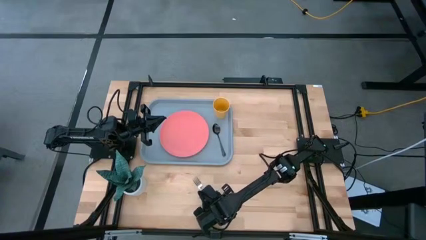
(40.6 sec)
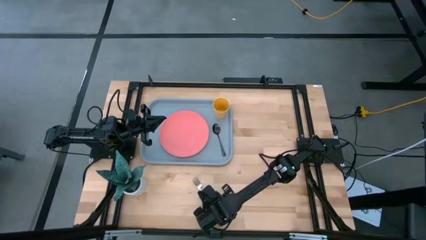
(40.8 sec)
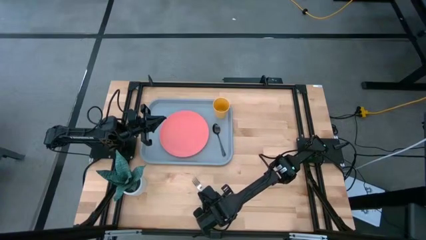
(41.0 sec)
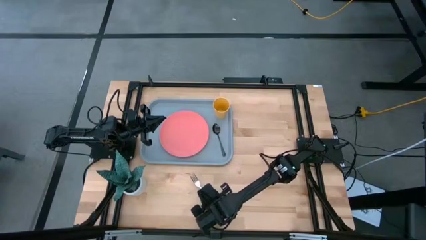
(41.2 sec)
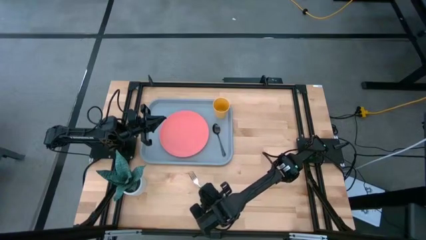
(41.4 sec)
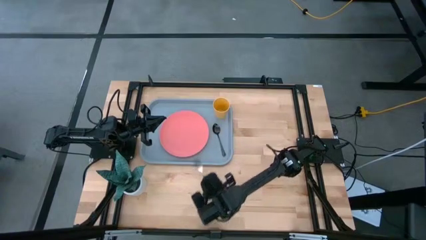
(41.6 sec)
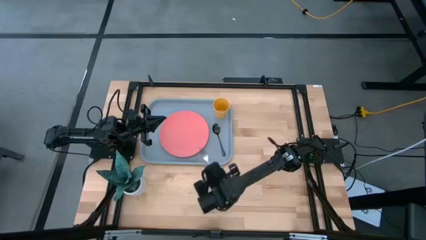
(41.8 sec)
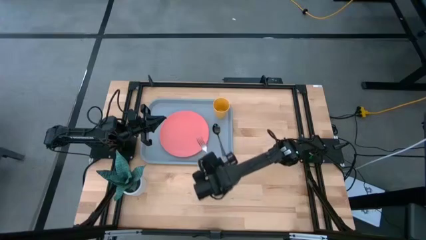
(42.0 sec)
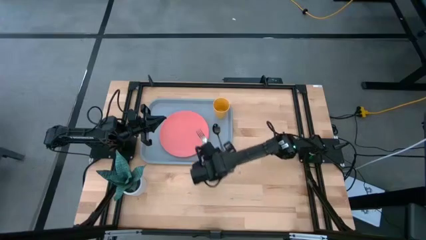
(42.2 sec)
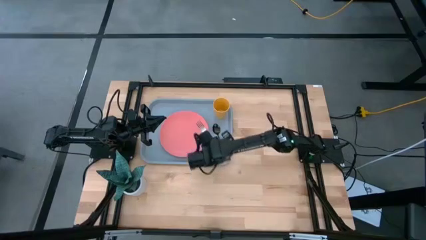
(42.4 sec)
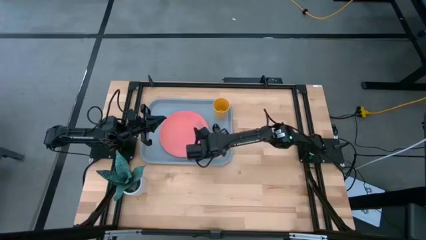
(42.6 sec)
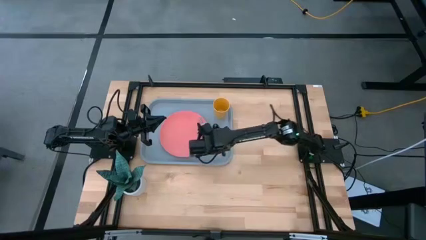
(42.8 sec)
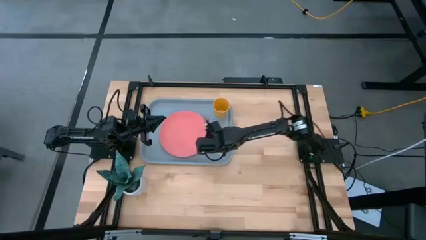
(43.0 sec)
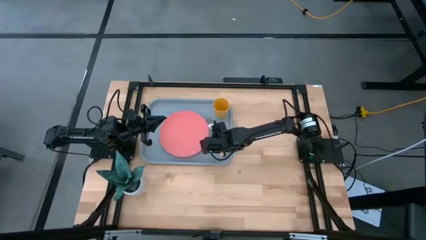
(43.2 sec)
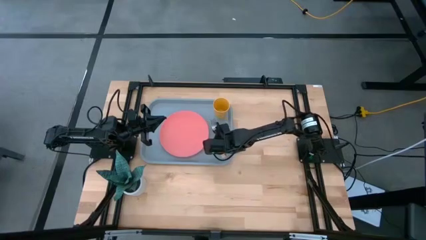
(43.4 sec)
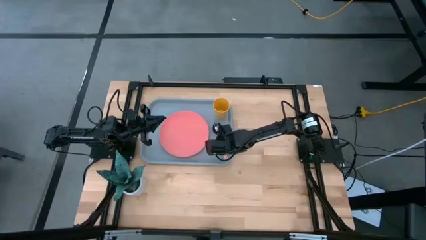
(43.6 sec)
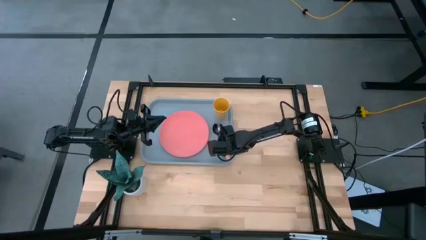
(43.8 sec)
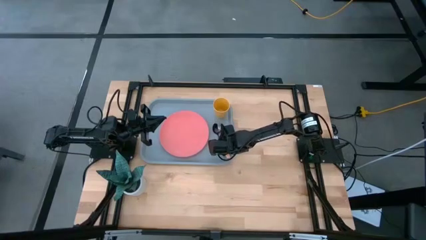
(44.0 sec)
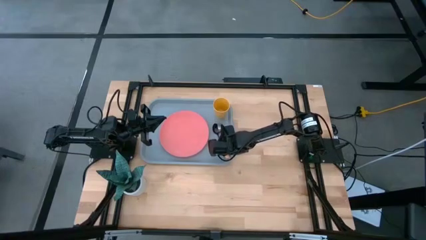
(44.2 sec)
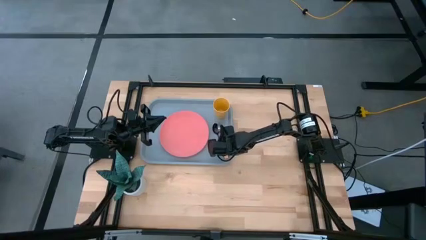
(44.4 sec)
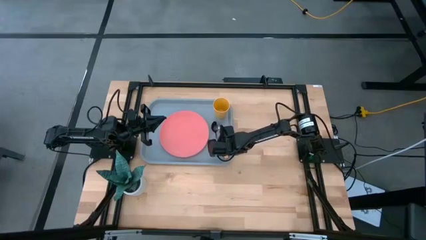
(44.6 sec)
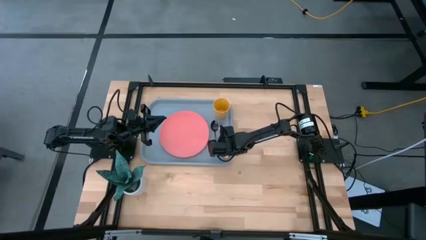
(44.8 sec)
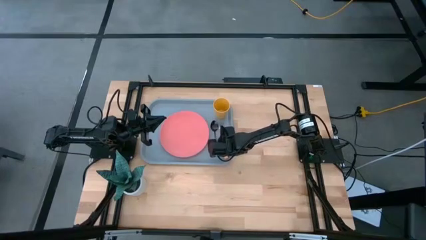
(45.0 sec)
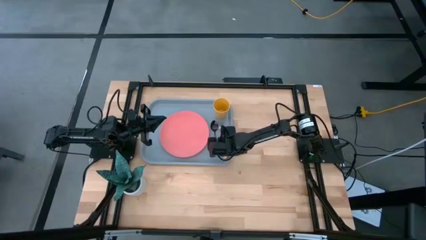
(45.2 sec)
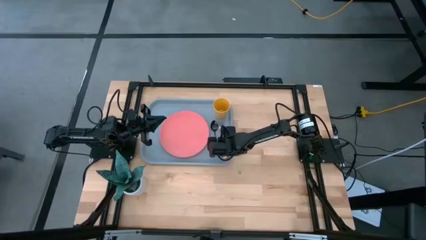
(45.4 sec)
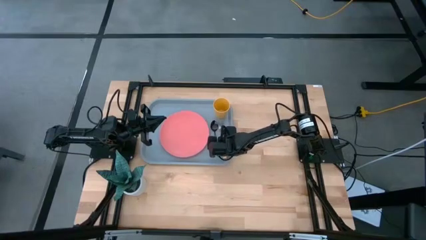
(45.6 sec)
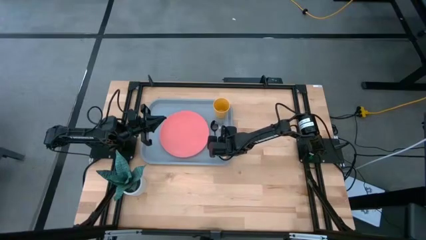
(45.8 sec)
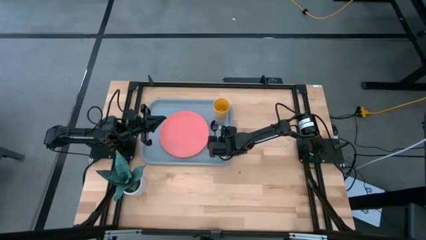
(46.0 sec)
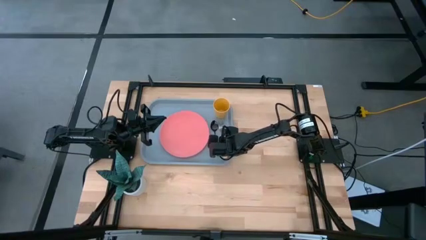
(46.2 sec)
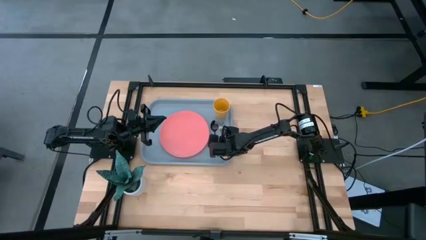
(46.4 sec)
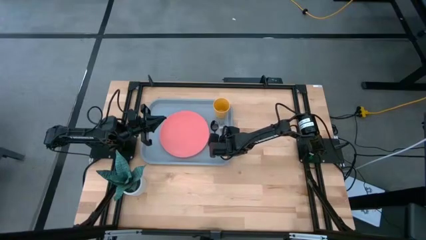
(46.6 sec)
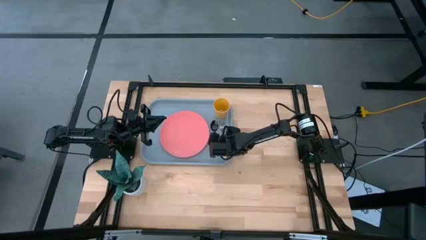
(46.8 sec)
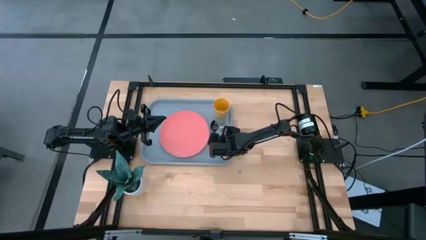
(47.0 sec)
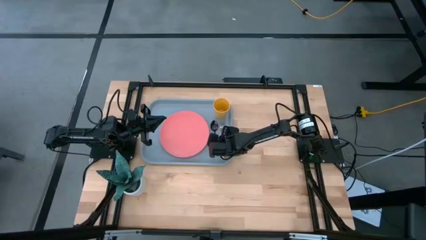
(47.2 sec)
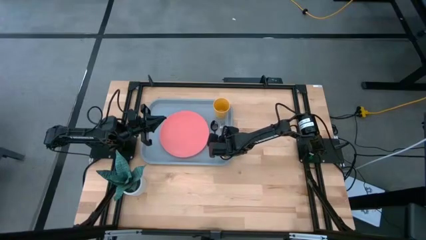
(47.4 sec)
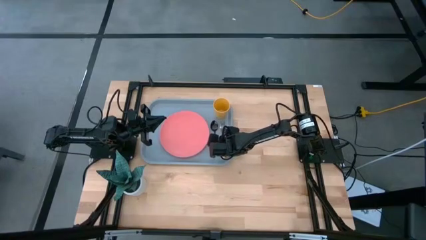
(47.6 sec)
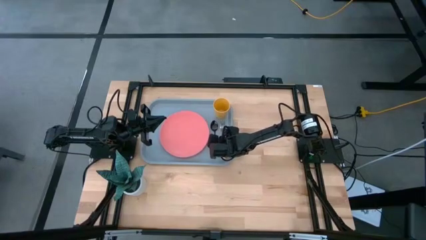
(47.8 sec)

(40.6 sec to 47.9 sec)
Task: Pick and place plate/cup/fork/spoon on tray
Put the orange fork beside the black spoon on the gray tray

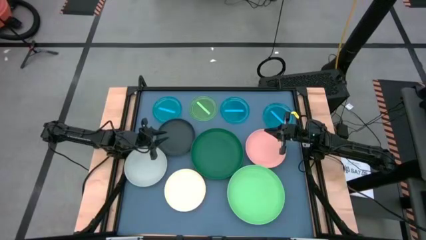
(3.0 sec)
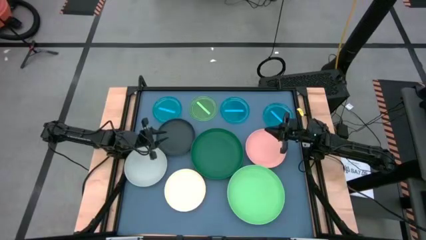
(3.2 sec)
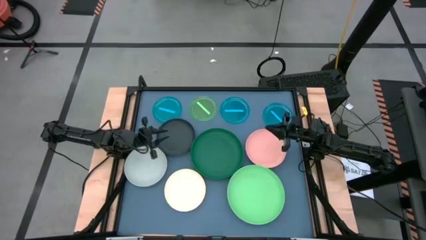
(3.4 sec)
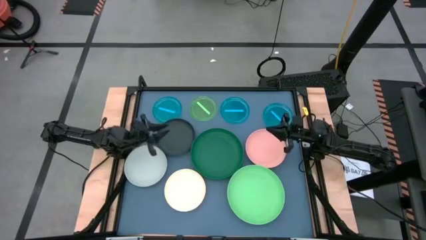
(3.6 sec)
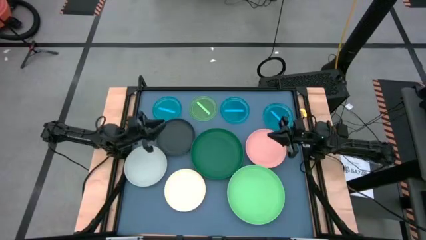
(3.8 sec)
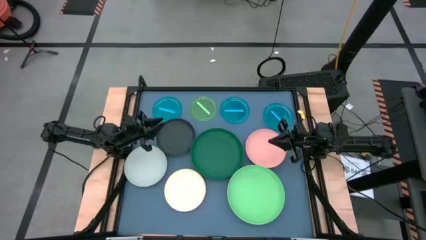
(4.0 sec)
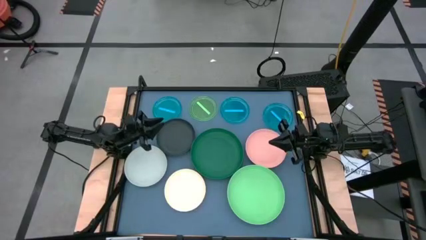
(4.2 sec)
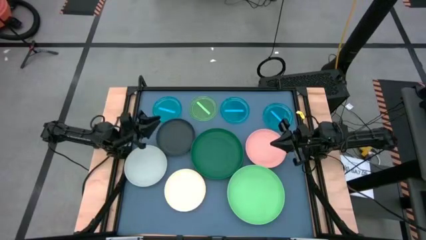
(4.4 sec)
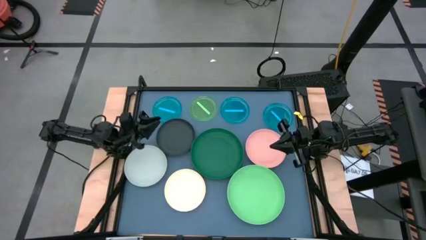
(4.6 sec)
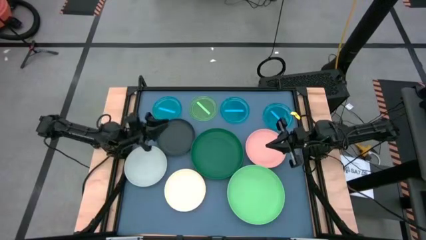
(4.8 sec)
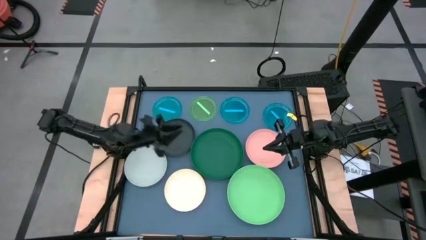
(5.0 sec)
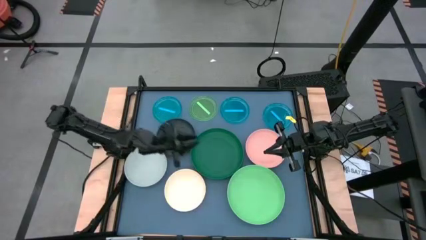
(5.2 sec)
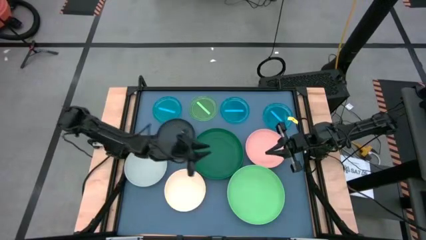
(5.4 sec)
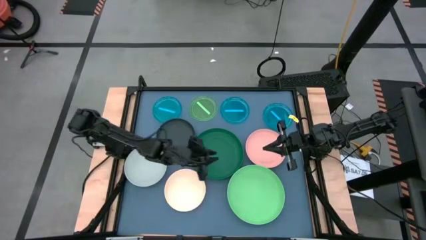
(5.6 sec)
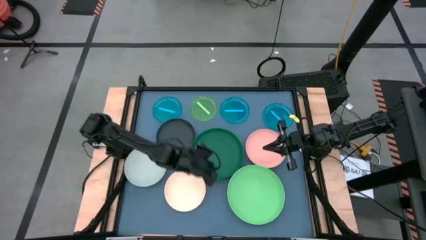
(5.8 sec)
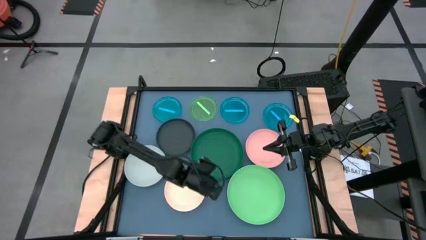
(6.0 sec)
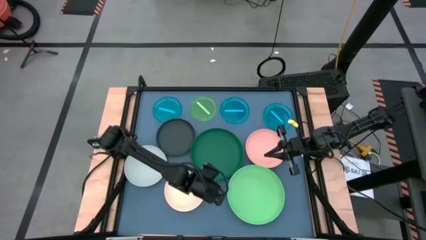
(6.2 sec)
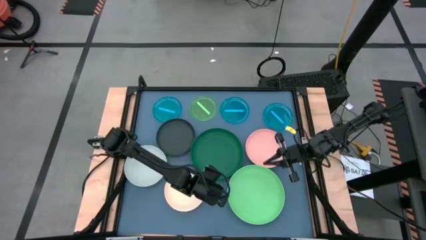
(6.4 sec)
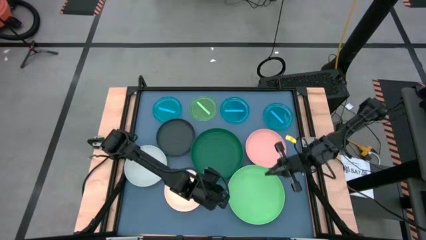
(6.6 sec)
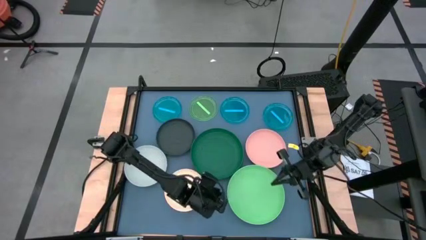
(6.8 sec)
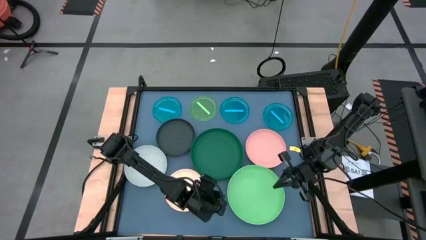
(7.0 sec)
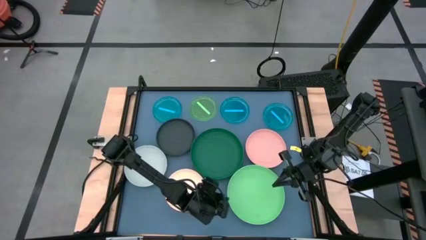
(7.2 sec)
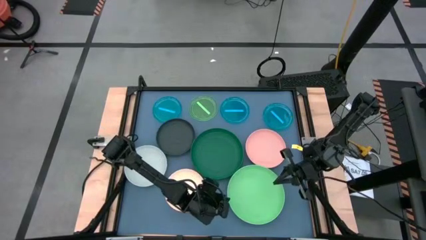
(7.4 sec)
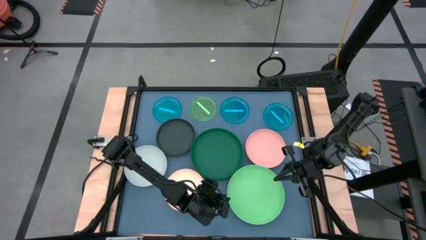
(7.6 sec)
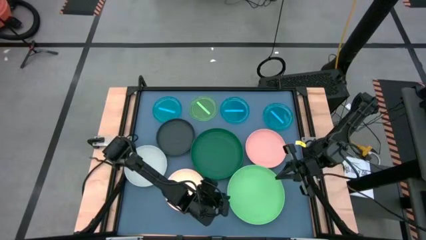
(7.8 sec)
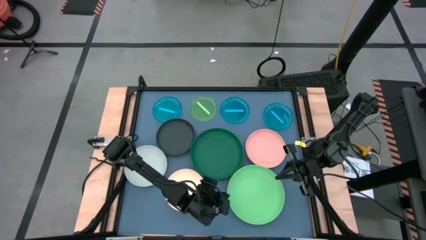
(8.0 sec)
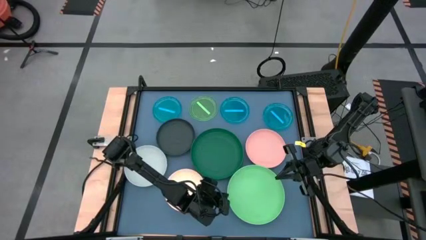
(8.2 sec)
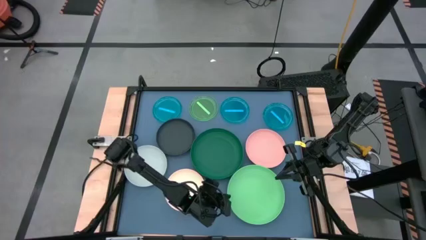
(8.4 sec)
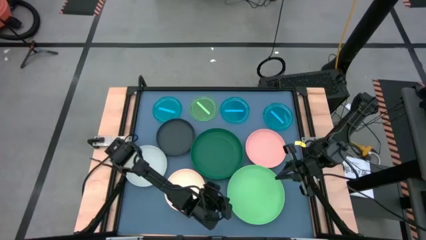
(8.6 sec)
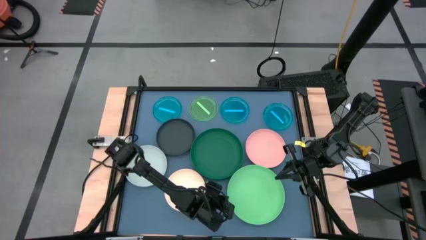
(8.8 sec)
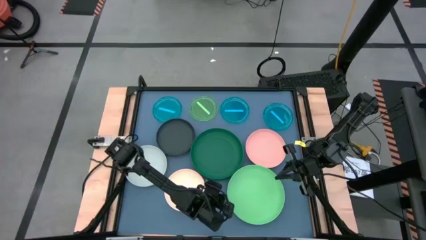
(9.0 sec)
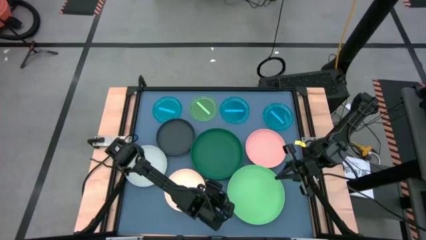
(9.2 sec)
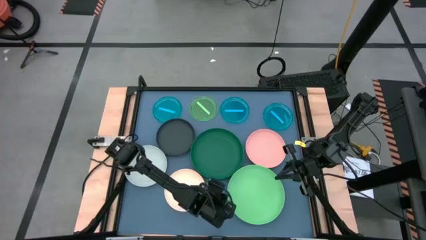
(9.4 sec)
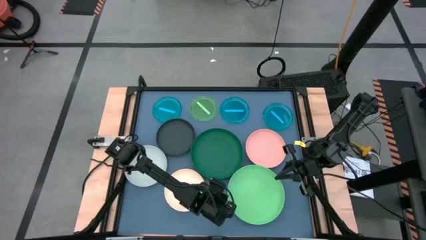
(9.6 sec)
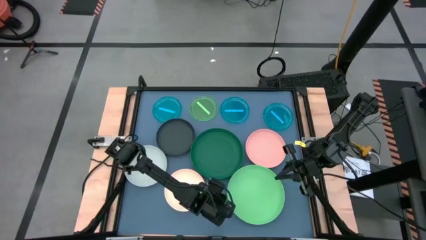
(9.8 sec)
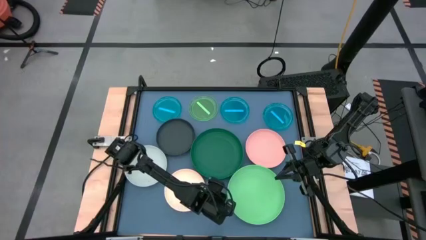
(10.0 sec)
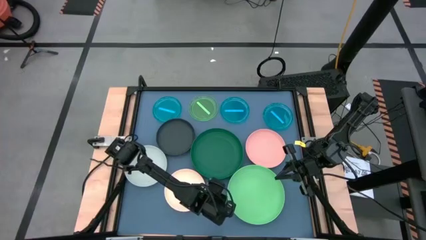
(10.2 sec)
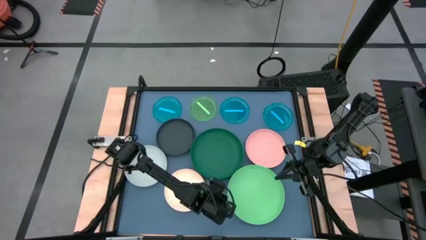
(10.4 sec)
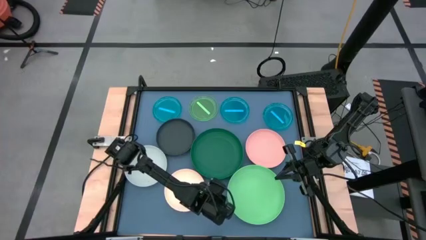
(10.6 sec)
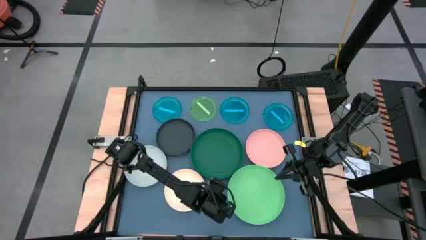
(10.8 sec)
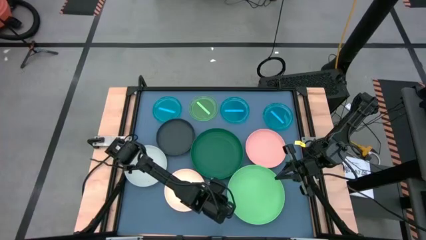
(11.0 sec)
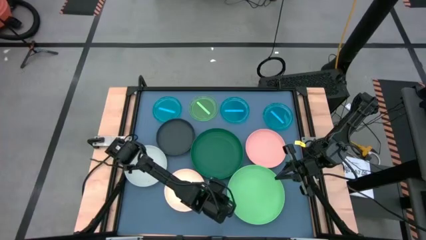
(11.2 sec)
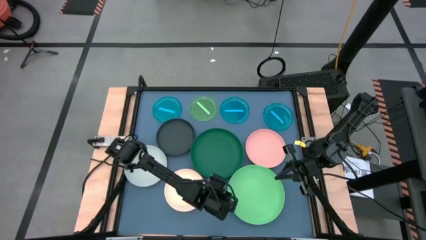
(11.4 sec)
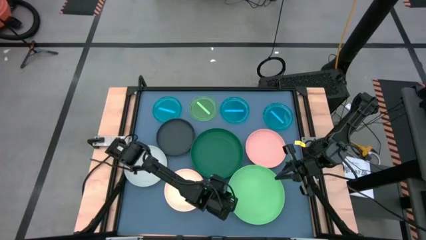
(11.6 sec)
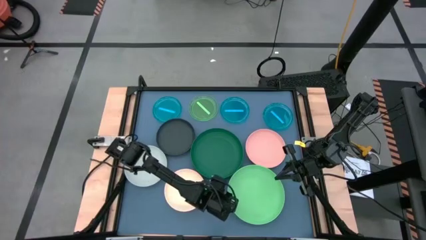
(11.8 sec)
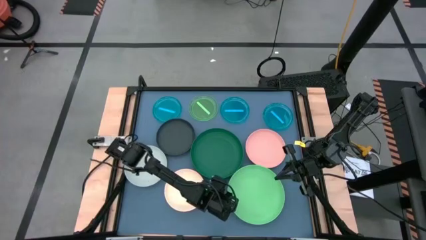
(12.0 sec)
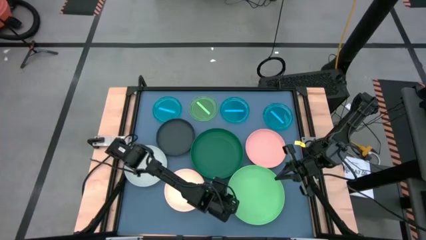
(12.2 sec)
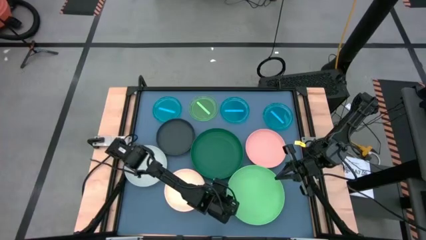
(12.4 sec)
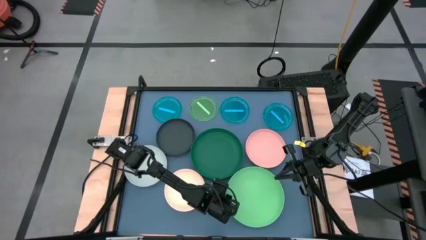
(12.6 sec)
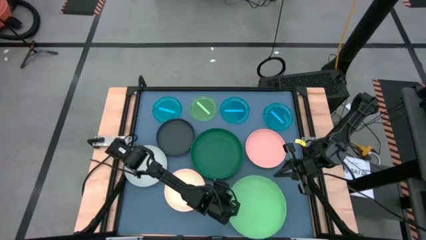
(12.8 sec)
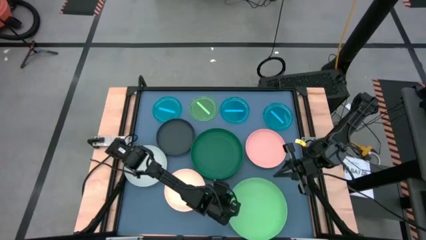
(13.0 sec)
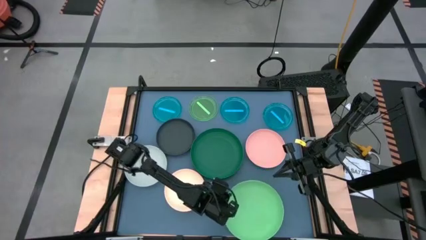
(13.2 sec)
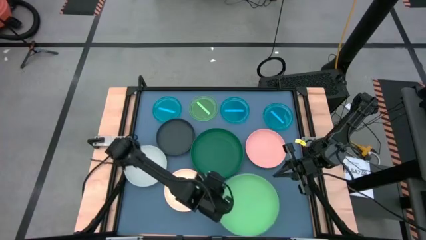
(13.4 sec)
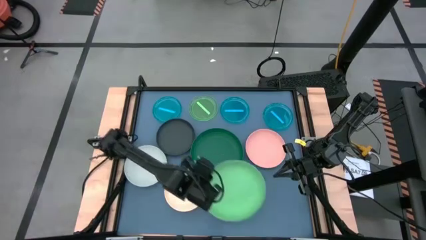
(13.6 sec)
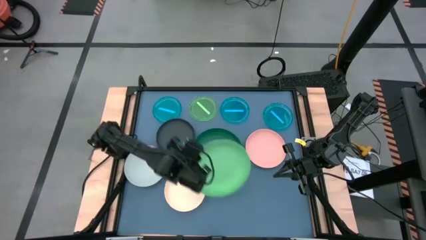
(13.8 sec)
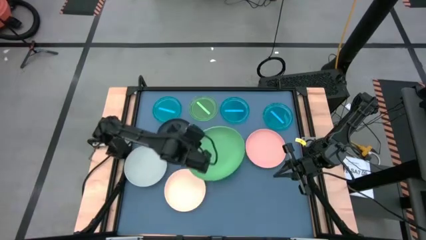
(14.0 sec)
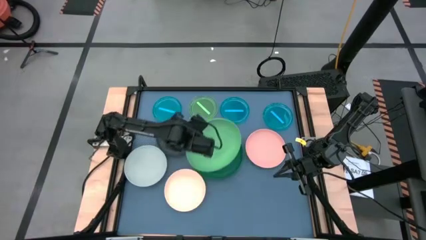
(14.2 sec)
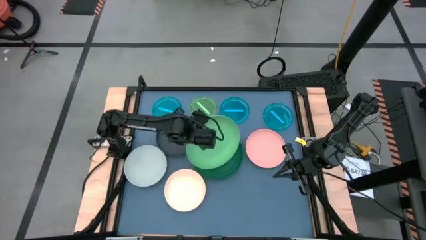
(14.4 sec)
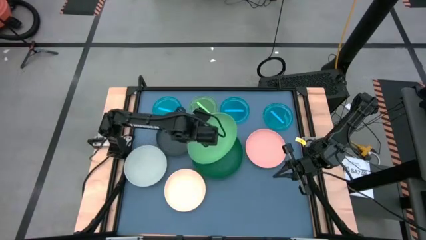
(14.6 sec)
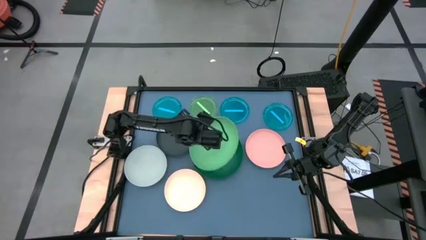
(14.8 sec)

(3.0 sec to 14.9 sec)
Task: Stack plastic plates
Stack the light green plate on the green plate
